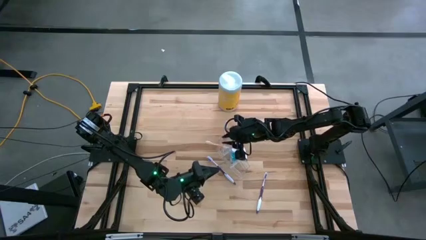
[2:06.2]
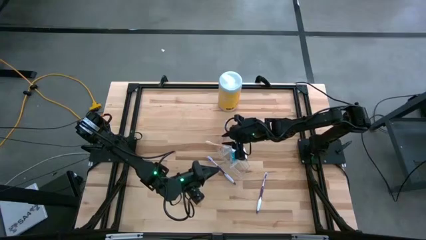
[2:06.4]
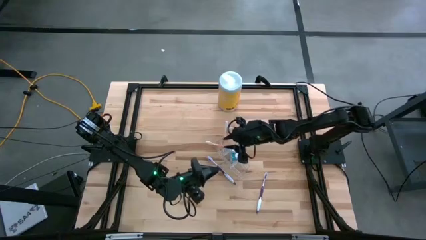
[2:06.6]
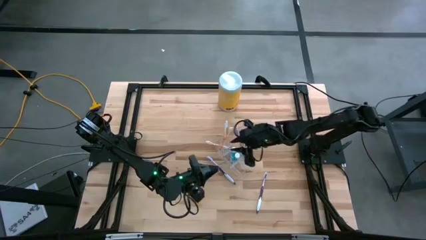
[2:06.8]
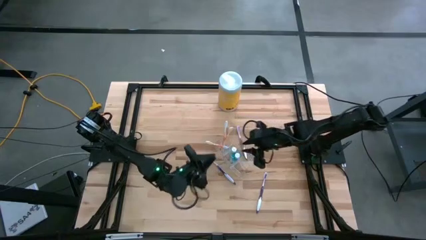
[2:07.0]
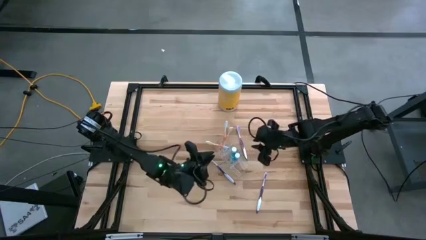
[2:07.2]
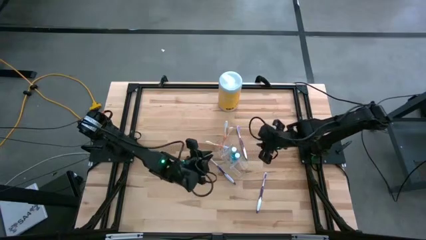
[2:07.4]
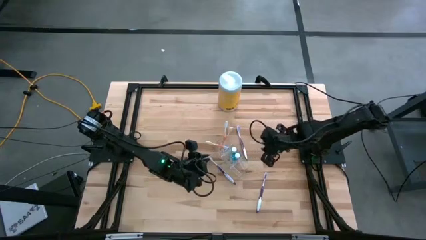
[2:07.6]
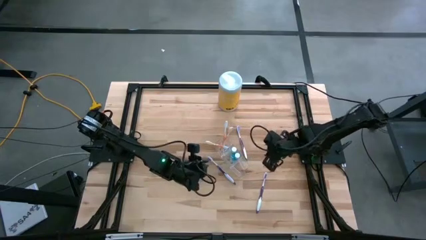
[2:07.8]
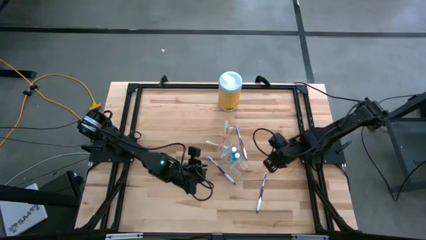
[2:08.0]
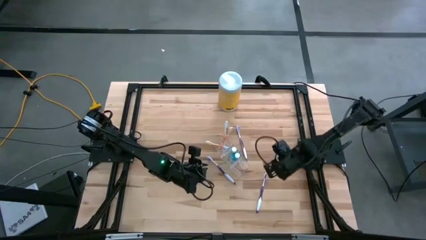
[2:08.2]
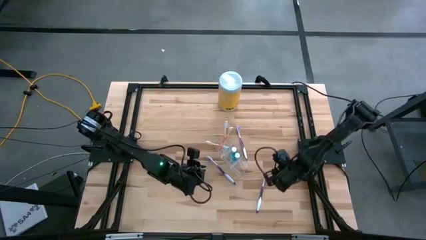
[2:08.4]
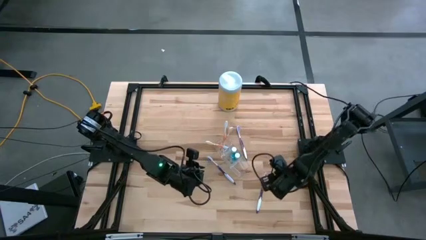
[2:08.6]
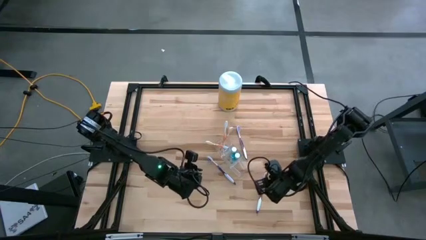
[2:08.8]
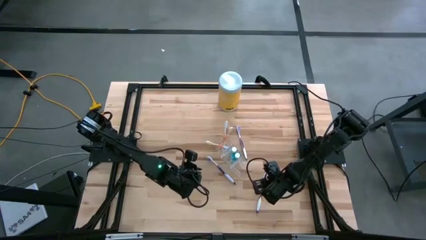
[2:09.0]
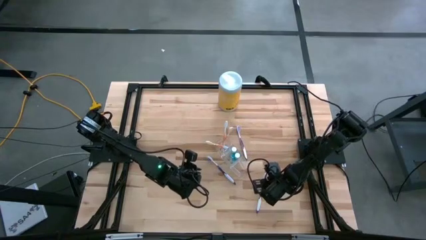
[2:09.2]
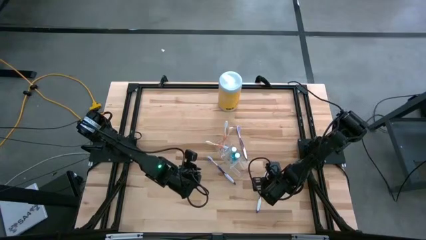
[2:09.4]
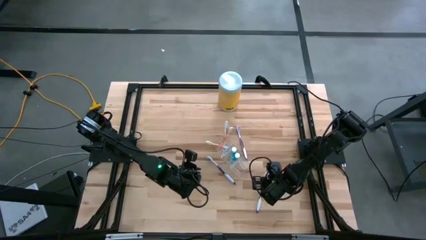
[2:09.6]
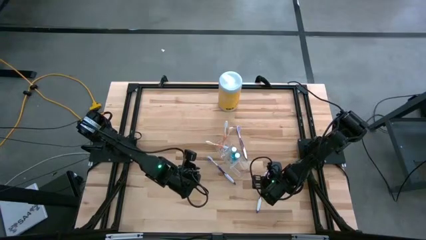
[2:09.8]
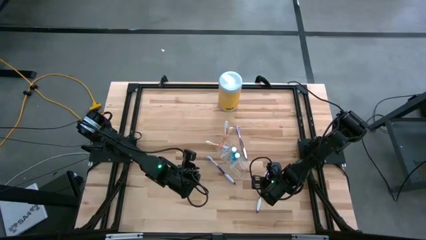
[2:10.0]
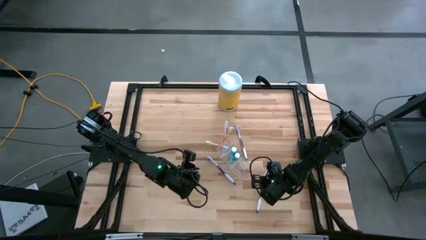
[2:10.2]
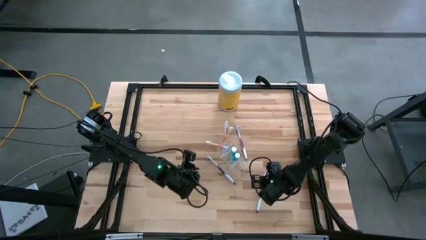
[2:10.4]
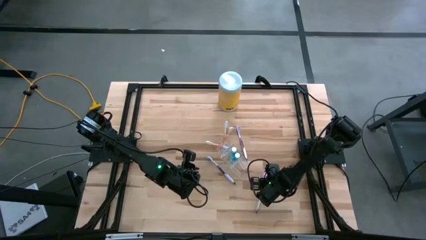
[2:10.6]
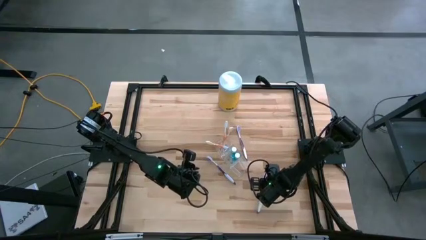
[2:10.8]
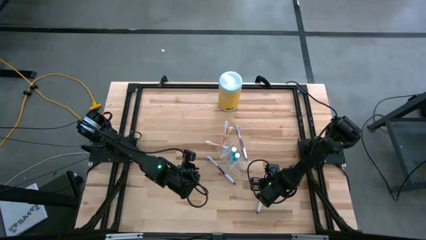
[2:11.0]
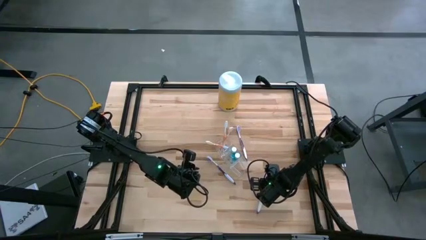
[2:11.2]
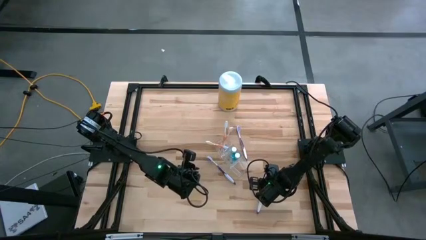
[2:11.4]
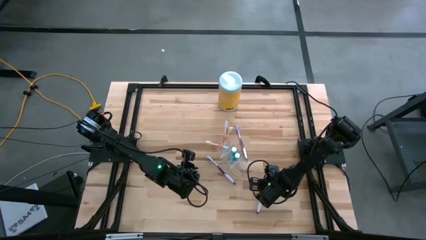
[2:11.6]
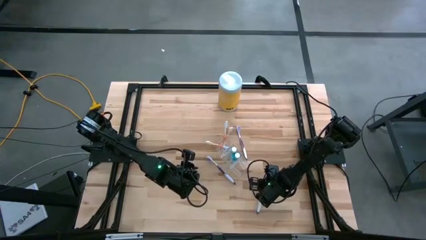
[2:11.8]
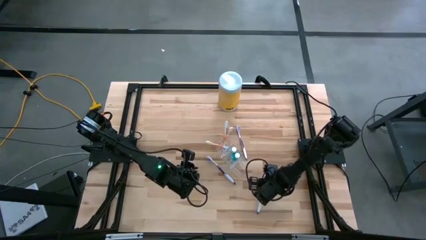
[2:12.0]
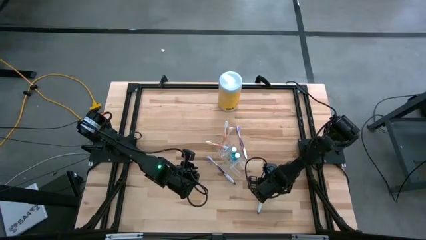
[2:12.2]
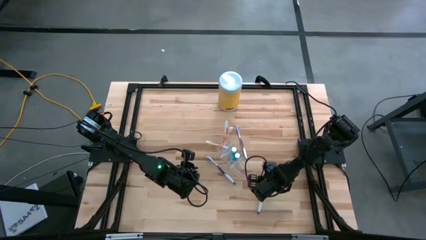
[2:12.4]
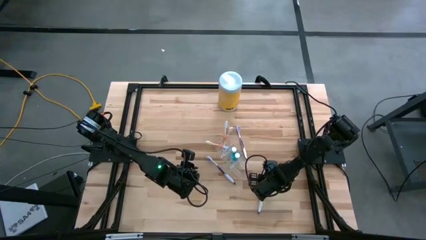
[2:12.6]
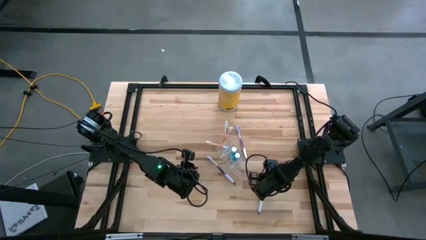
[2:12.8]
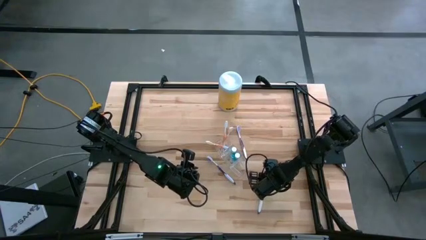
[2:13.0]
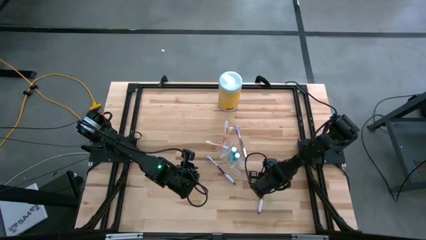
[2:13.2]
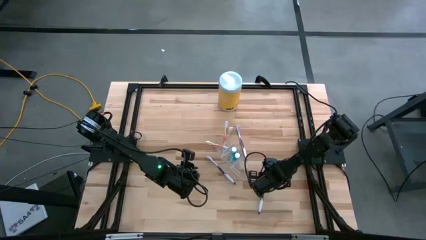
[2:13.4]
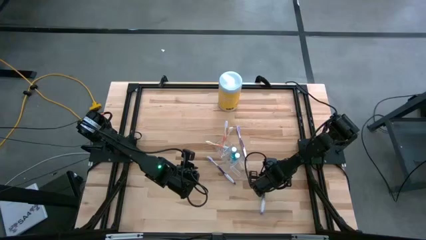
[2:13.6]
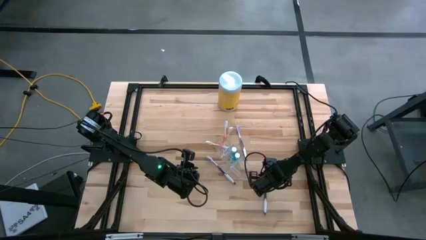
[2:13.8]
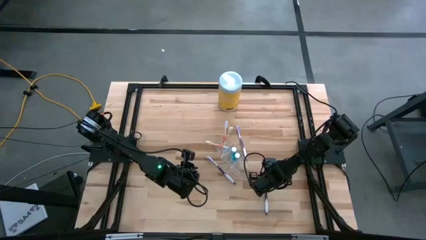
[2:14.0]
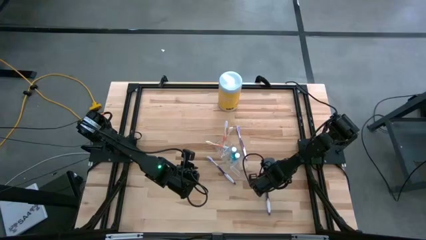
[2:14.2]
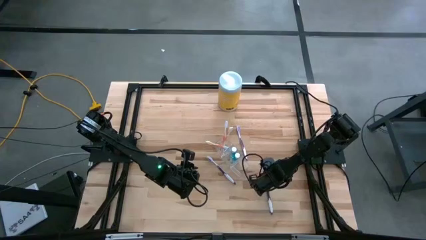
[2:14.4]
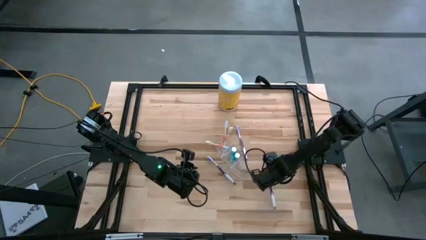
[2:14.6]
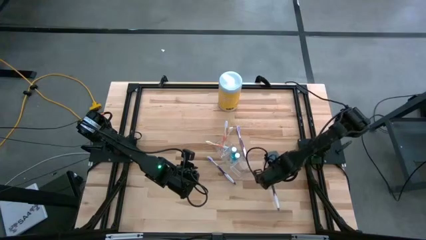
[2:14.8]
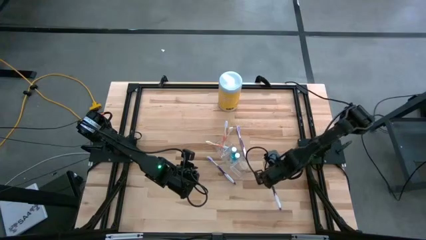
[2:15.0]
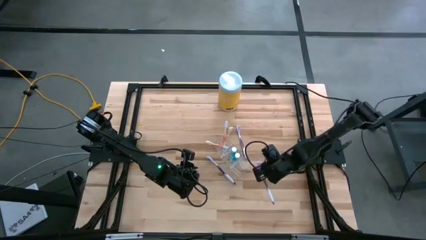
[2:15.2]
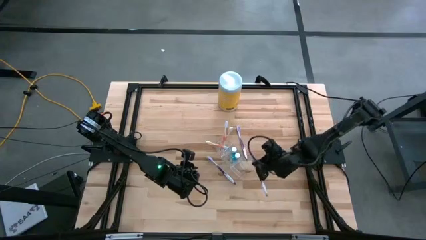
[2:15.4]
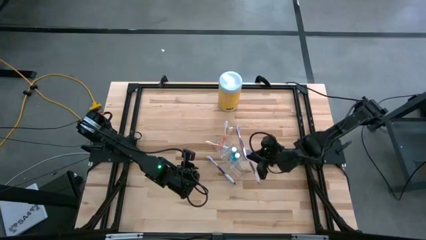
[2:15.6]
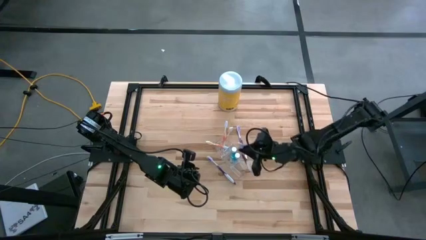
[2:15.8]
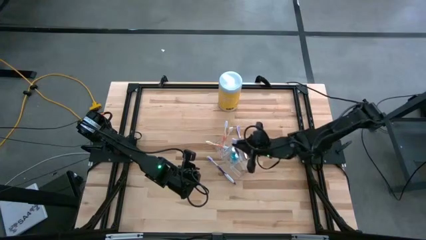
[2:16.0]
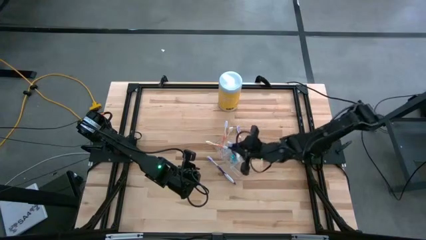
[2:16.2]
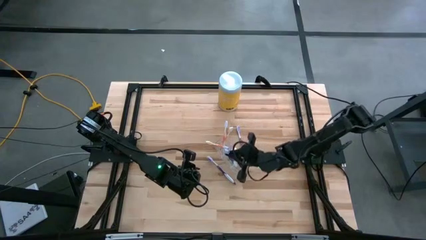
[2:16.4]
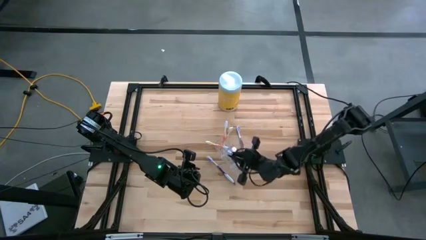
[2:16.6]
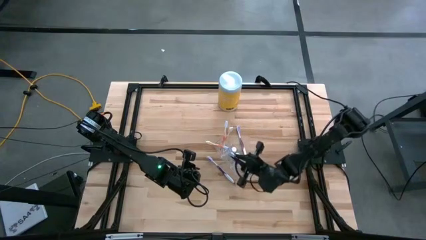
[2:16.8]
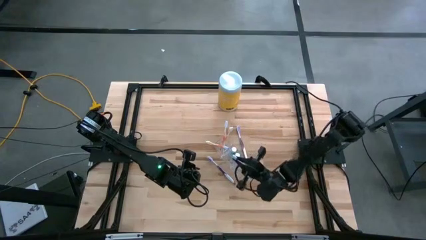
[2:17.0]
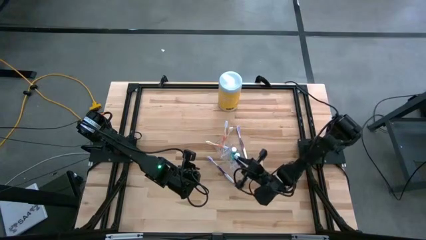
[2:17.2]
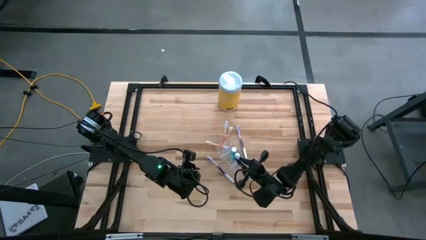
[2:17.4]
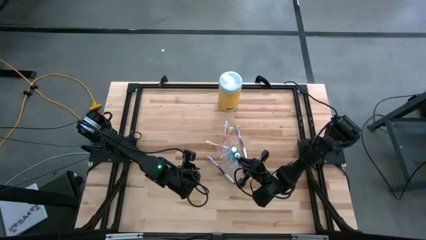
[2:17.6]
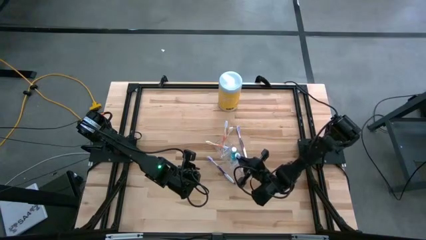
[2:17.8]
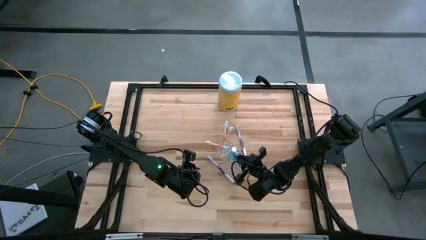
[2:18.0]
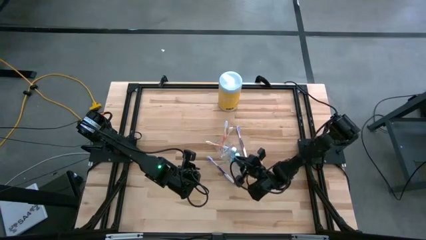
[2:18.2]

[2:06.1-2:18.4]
Task: Pick & Place toothbrushing station
Put the bottom purple toothbrush into the bottom compartment of the transparent organizer
